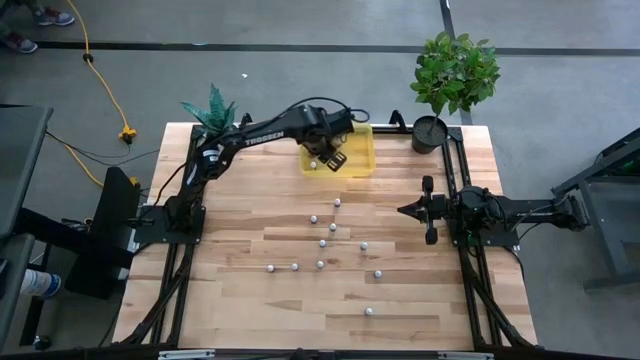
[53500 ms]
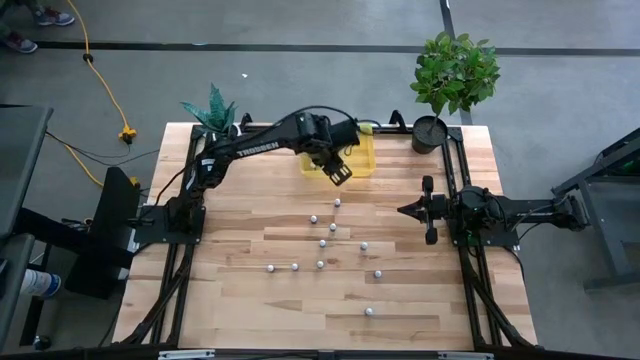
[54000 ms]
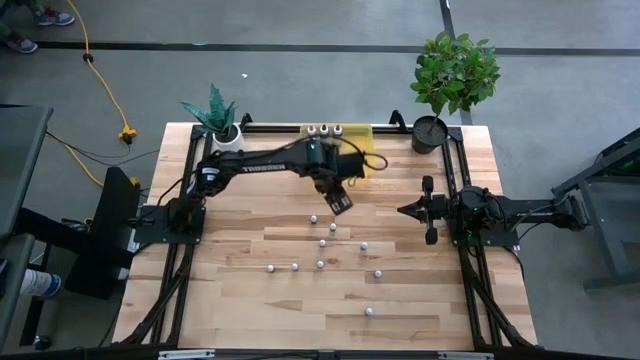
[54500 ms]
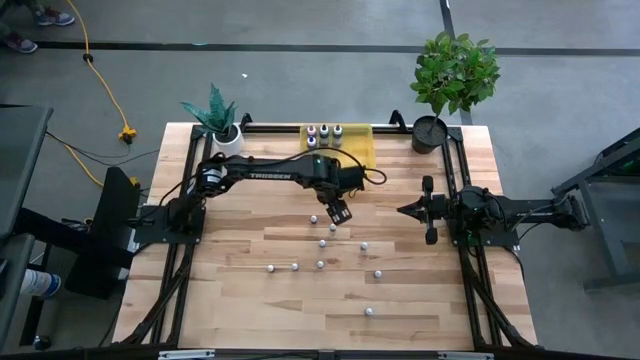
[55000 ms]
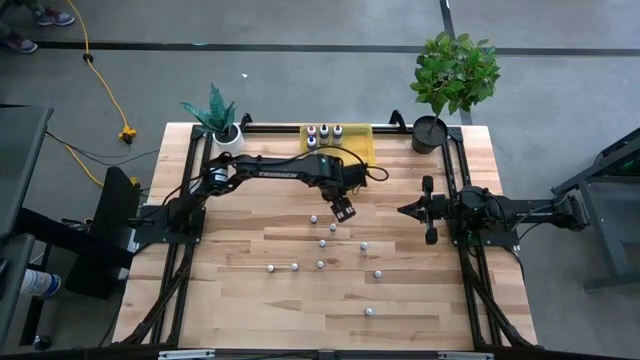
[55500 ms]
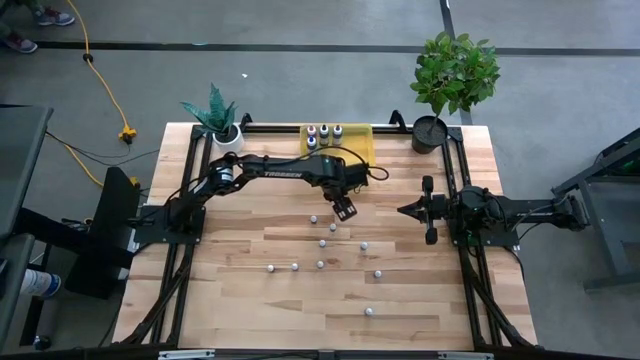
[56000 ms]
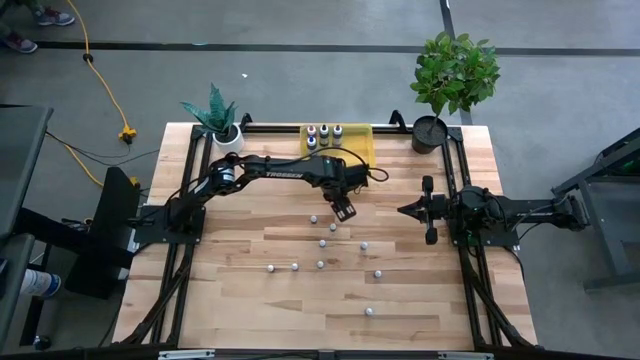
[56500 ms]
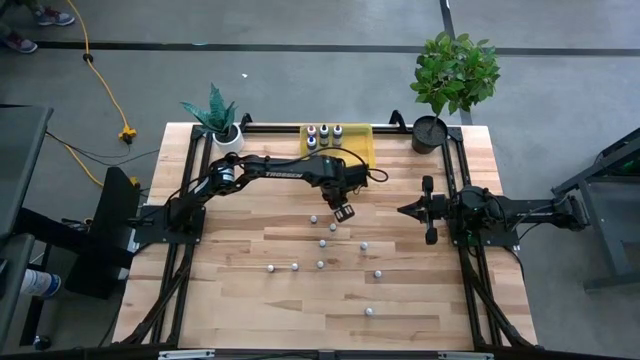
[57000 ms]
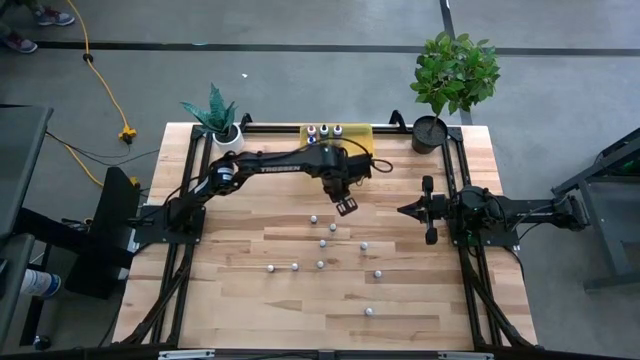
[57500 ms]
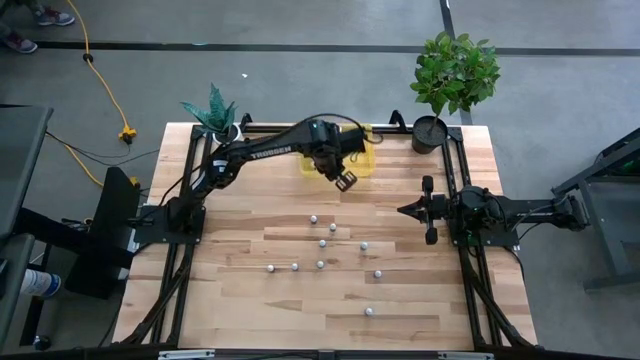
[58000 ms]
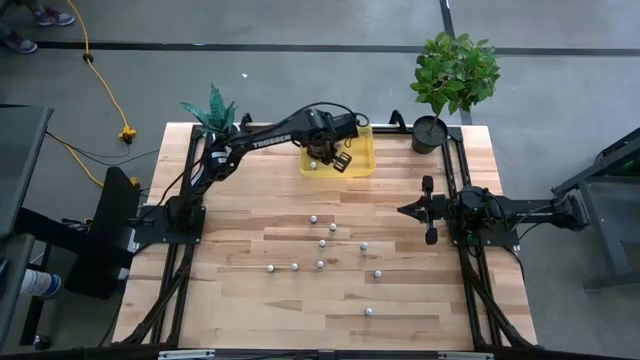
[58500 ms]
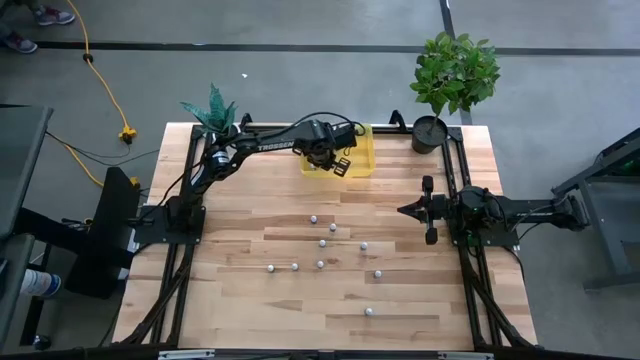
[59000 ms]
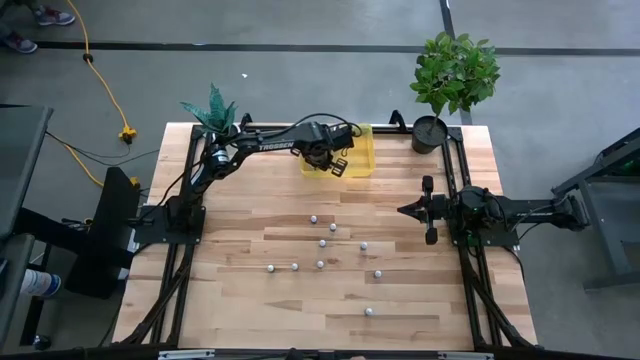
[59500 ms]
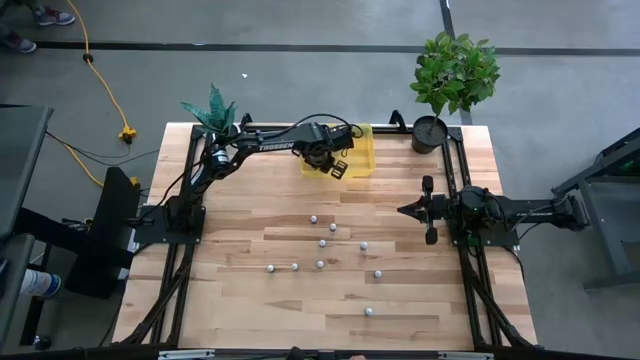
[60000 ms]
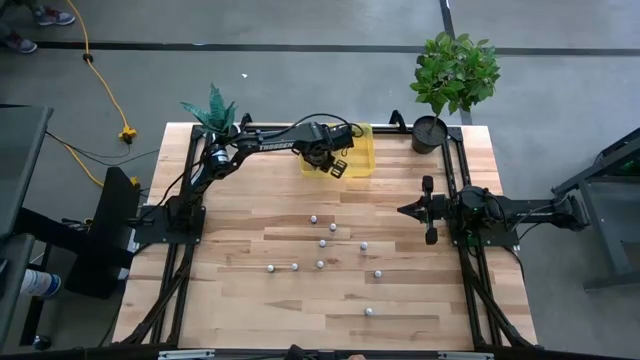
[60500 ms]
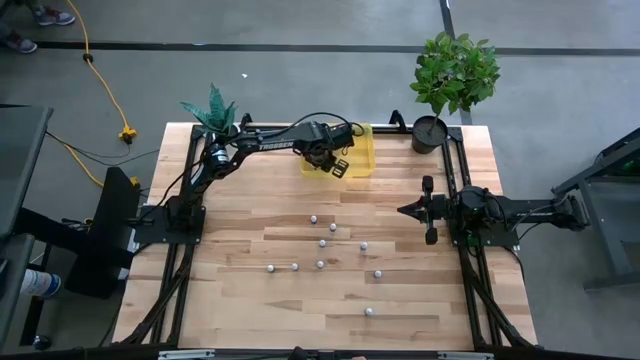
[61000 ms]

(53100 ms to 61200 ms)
Task: Pick & Place food coloring
Put the small orange food coloring bottle into the yellow bin

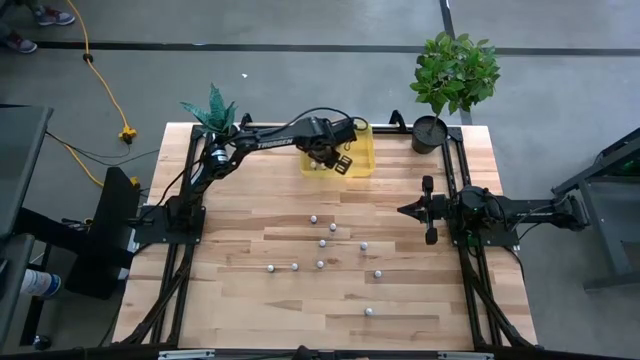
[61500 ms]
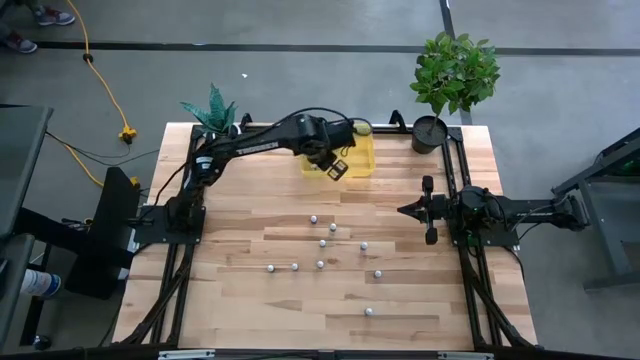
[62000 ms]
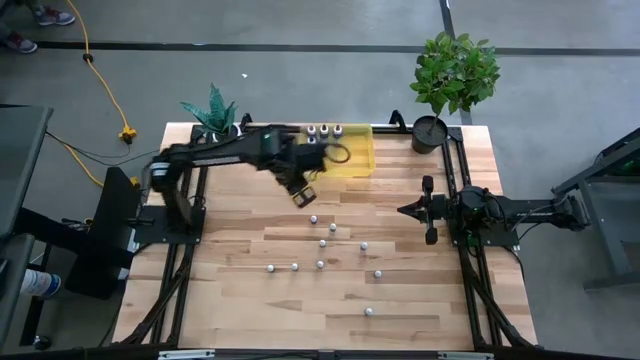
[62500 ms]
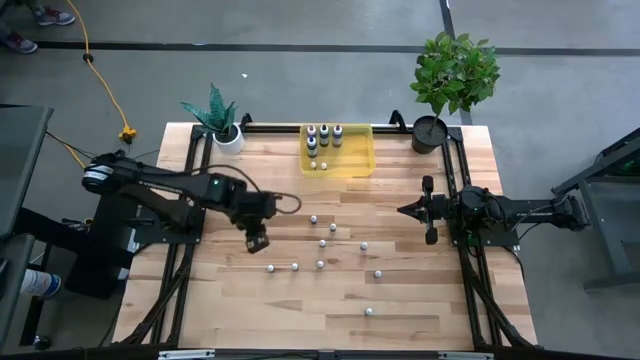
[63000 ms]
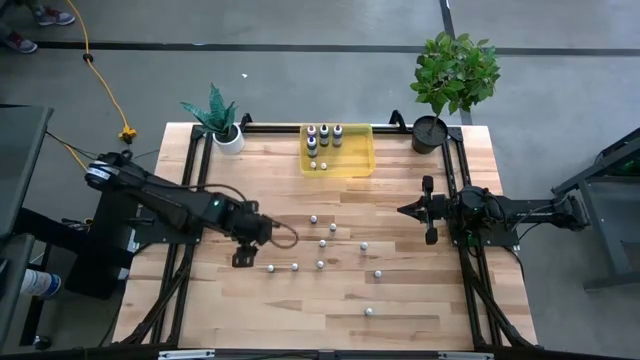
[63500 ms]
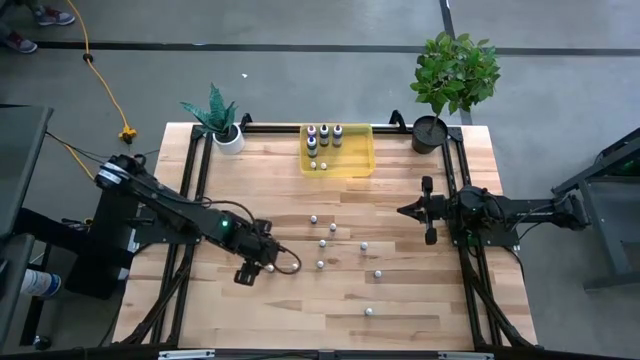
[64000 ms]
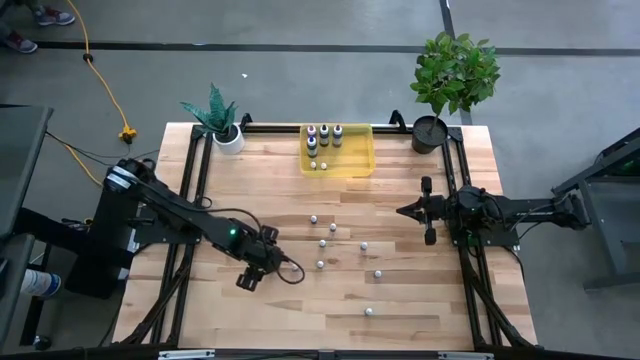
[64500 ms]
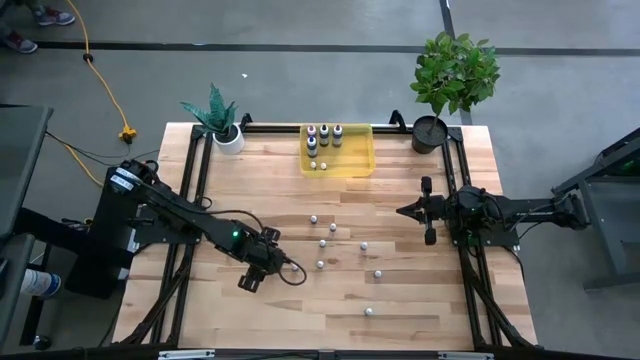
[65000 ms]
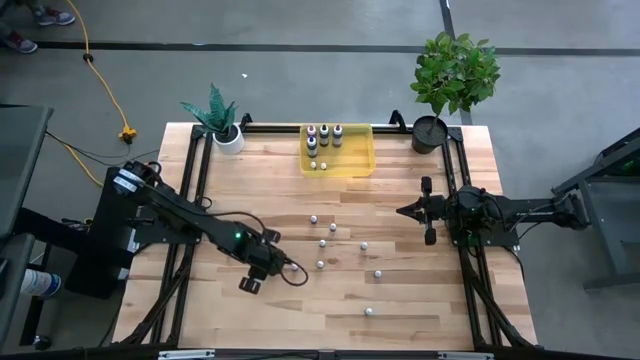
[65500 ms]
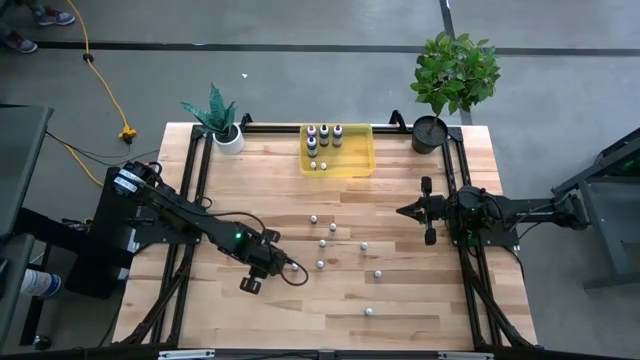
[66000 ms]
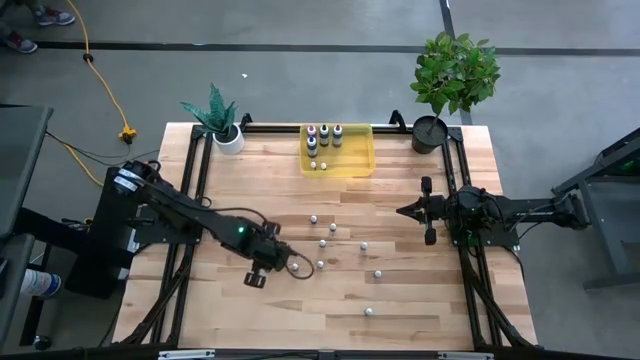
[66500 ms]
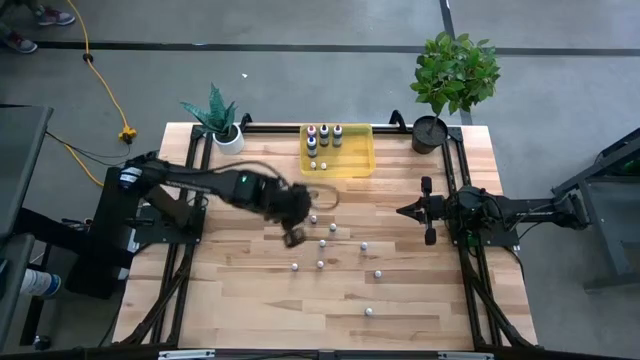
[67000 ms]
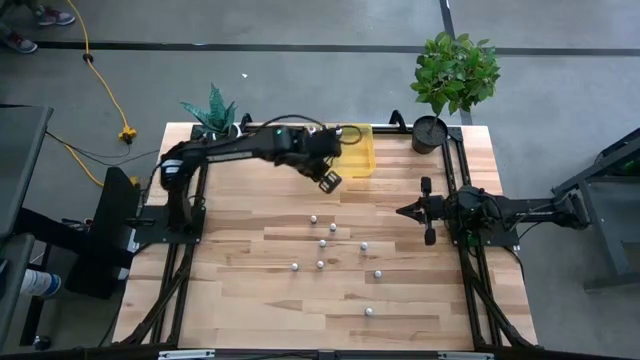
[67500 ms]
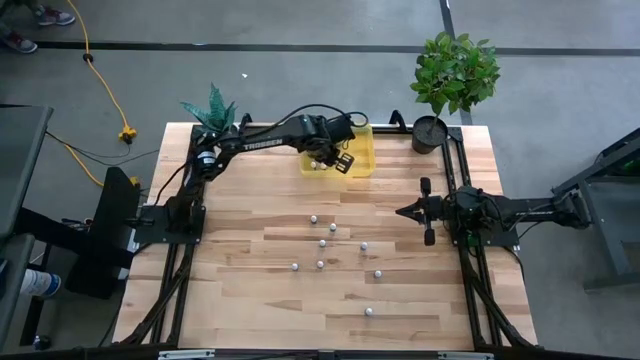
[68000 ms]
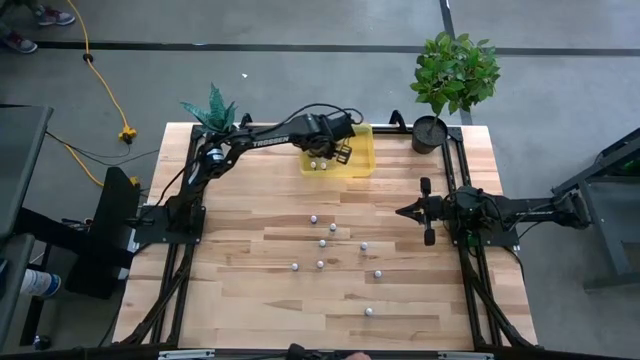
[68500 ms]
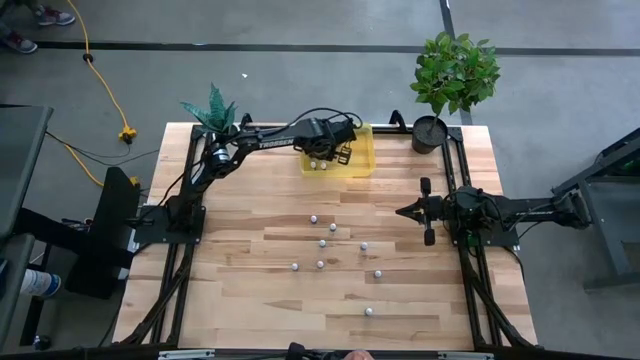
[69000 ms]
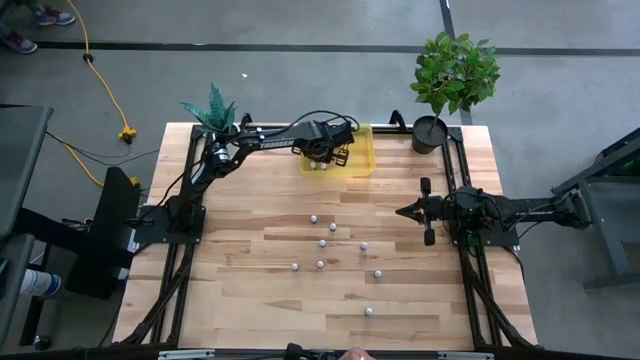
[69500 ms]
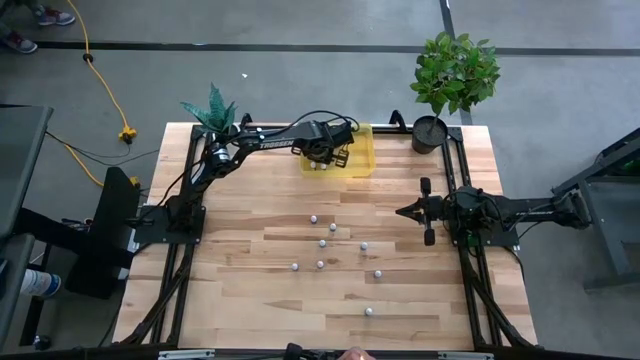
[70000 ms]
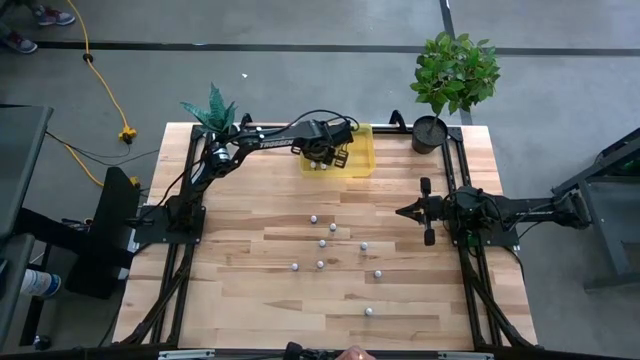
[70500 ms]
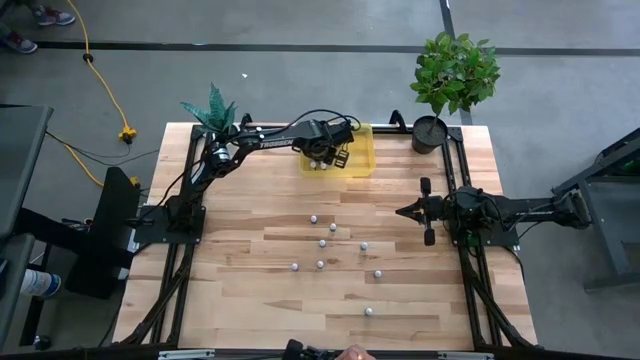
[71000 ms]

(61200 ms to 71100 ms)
Put the small purple food coloring bottle into the yellow bin

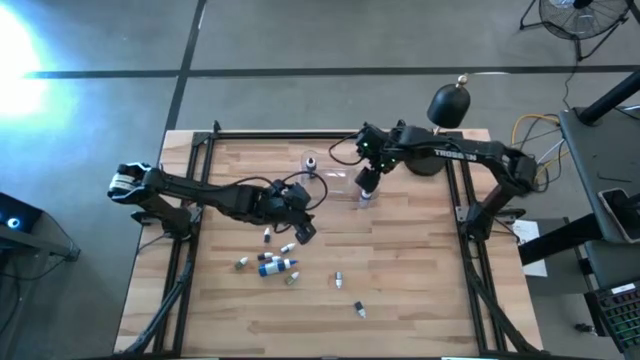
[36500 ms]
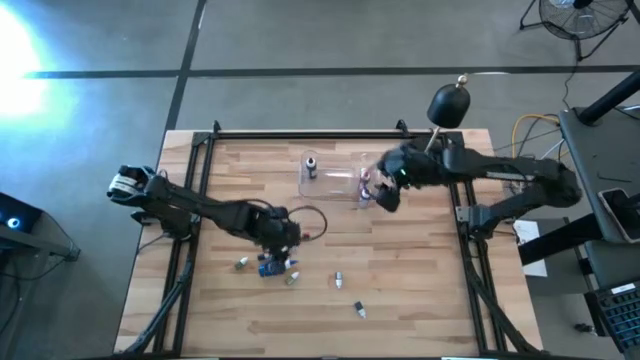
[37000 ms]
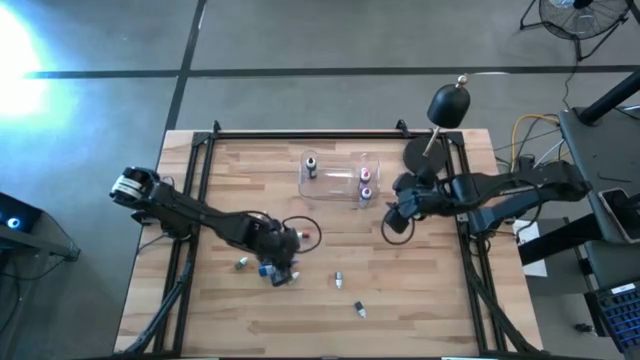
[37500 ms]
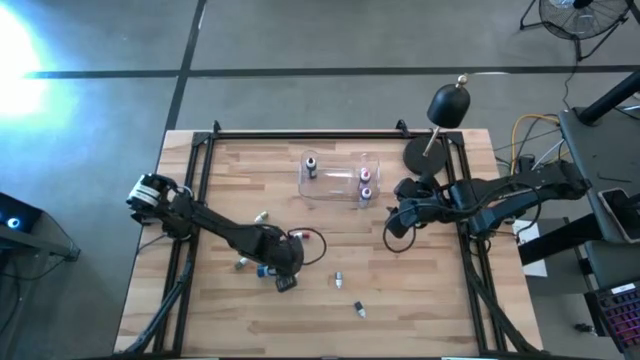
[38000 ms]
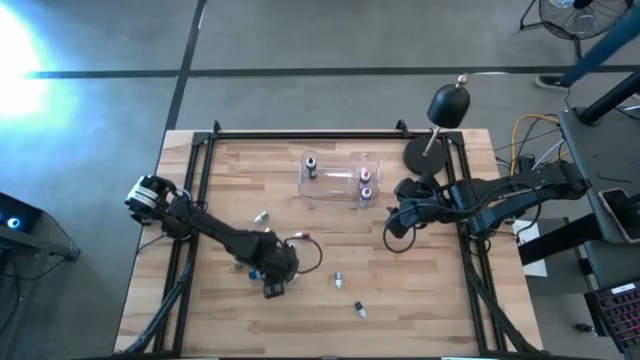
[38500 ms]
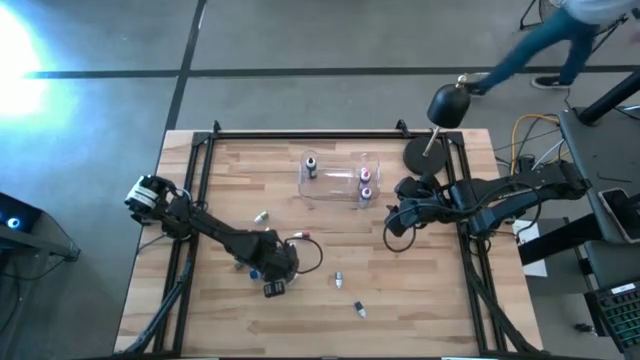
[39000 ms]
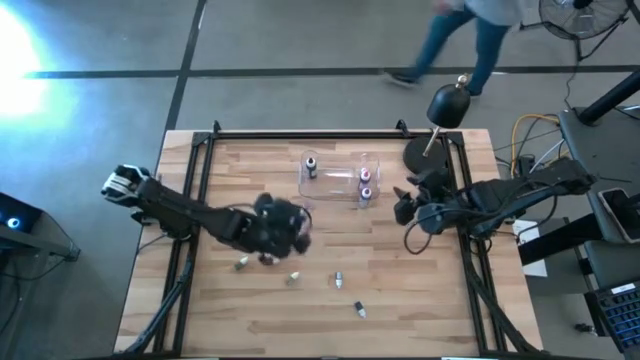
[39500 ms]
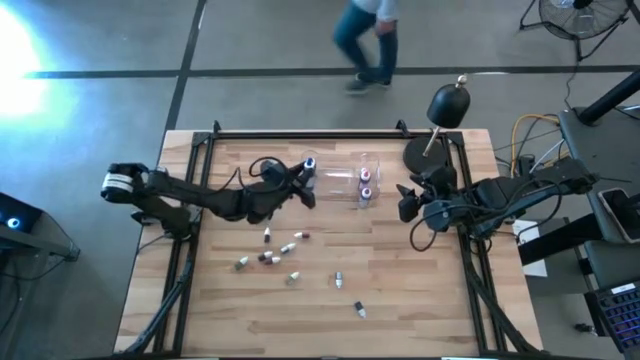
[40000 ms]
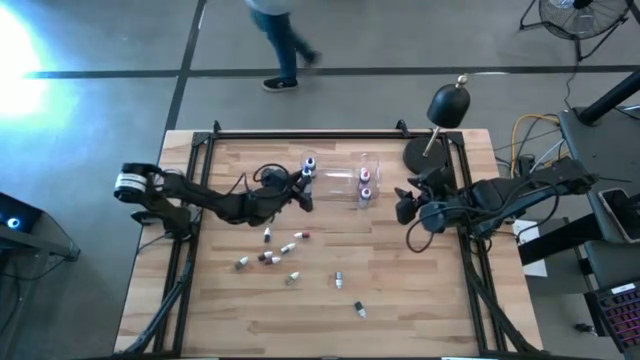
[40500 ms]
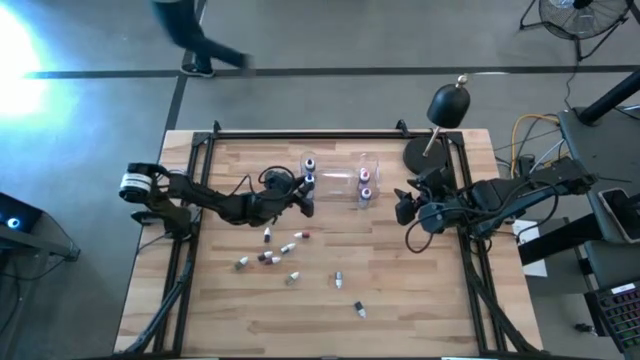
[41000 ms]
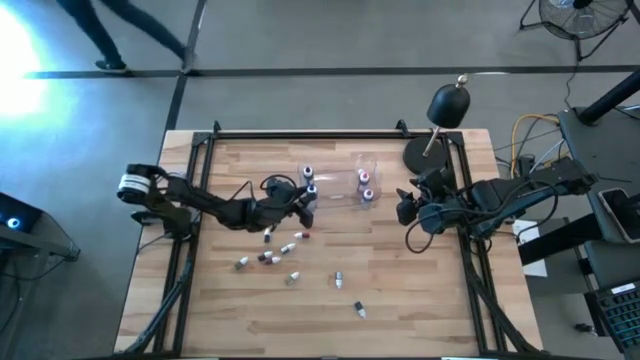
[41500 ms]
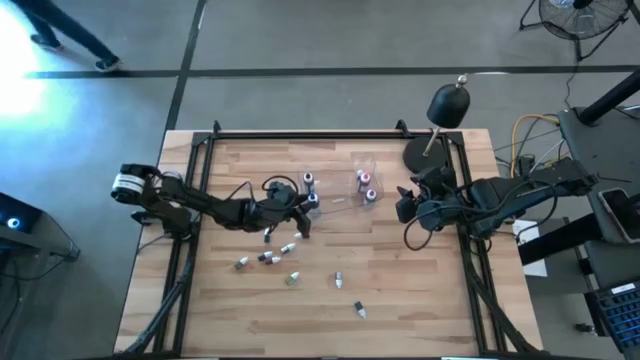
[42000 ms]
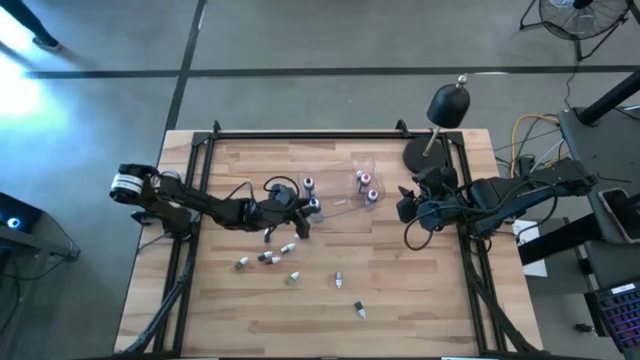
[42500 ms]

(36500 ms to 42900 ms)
Task: Pick & Place food coloring
Put the big blue food coloring bottle into the transparent bin
